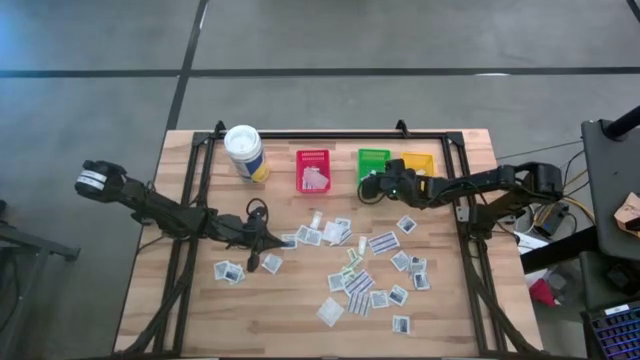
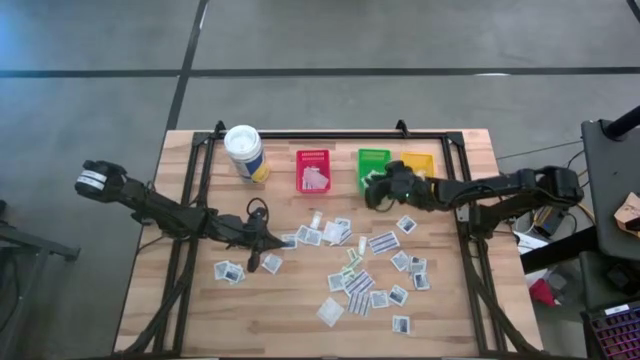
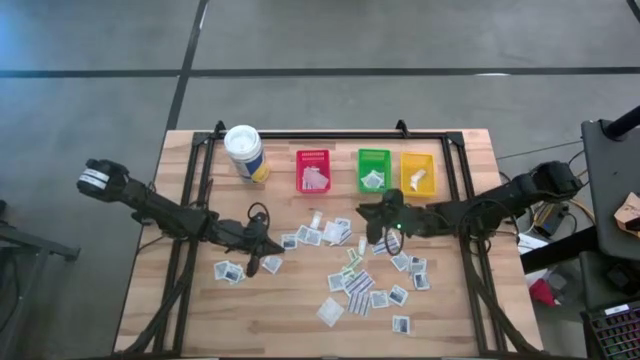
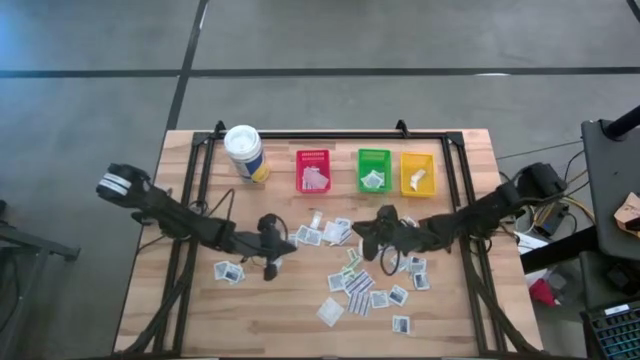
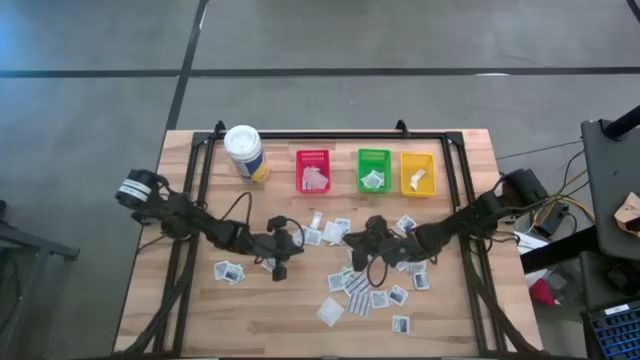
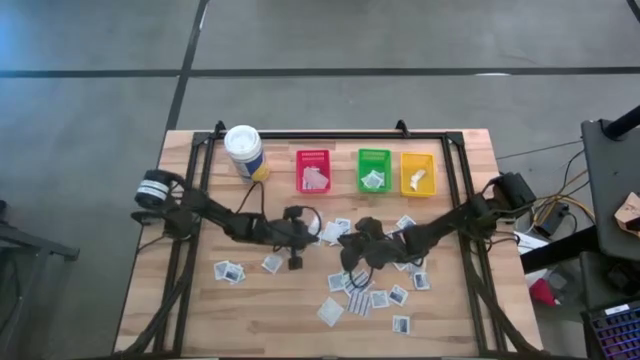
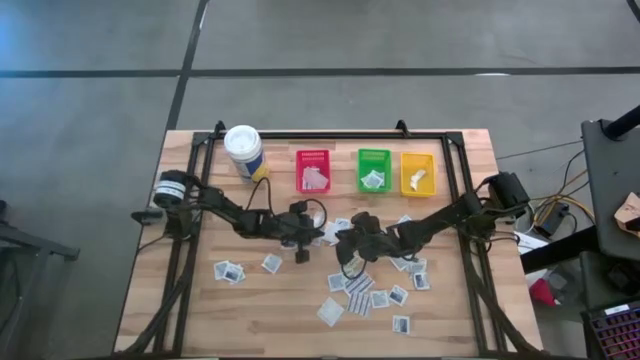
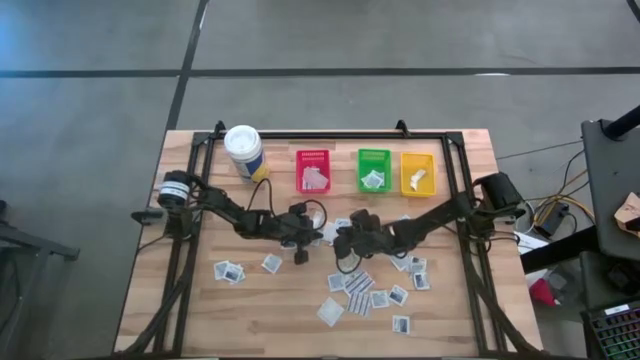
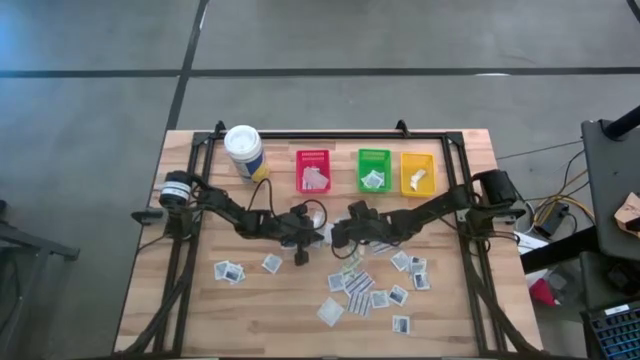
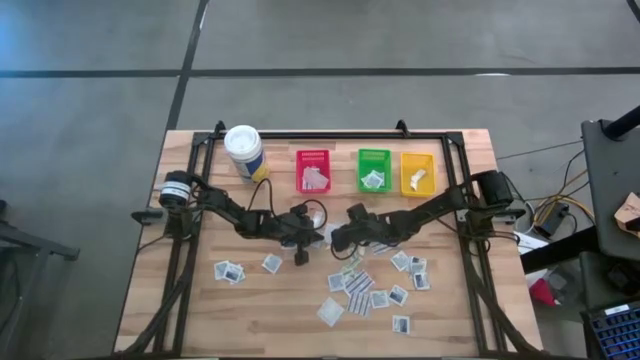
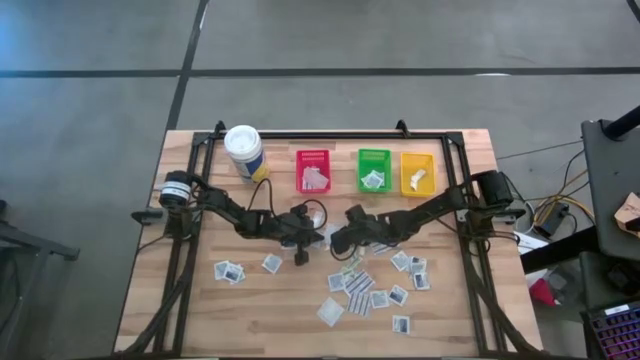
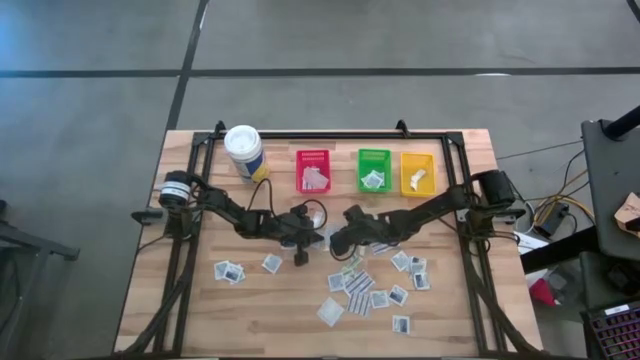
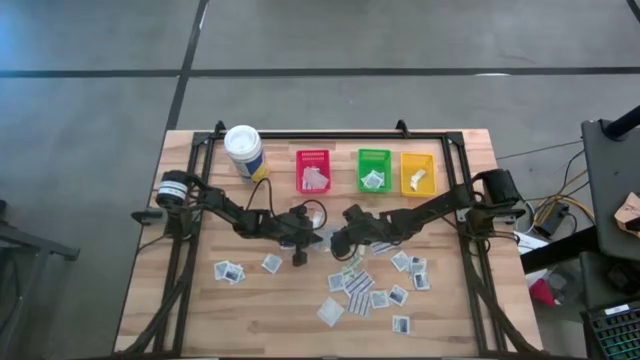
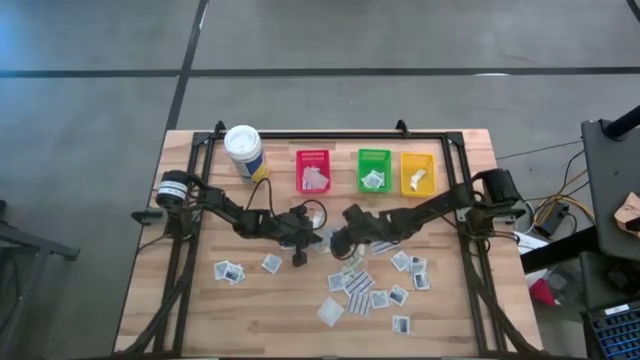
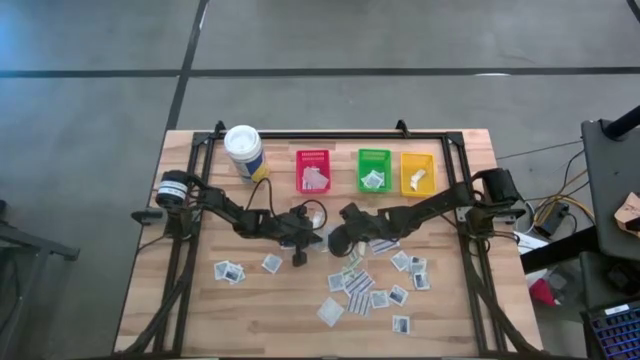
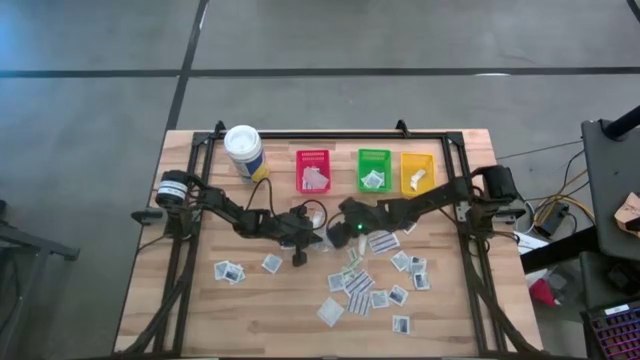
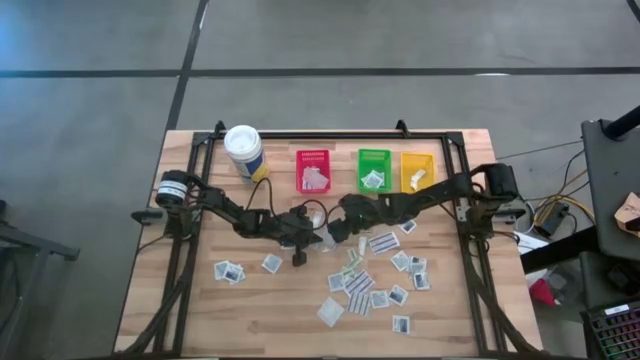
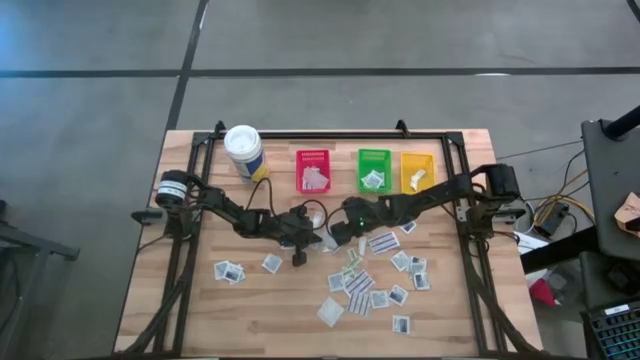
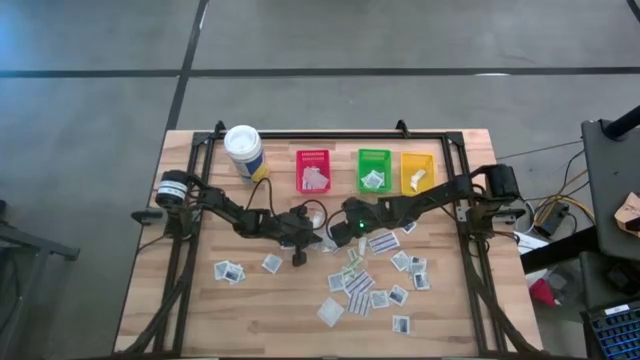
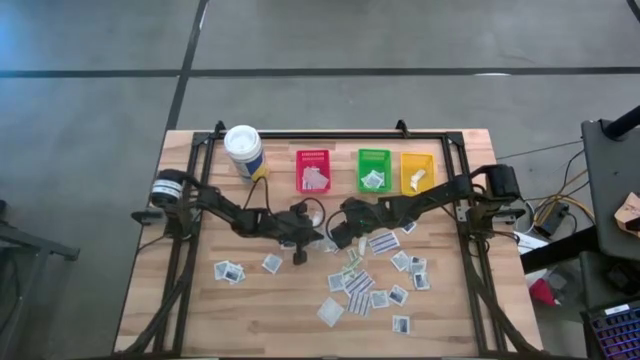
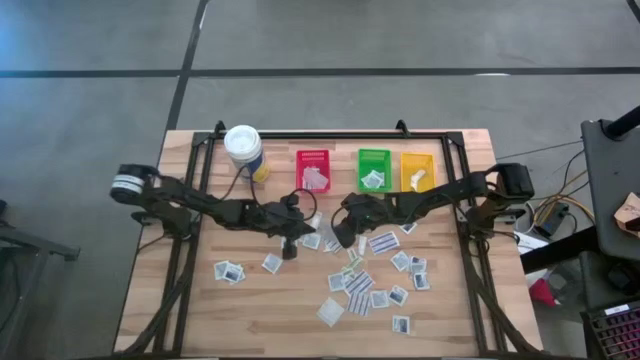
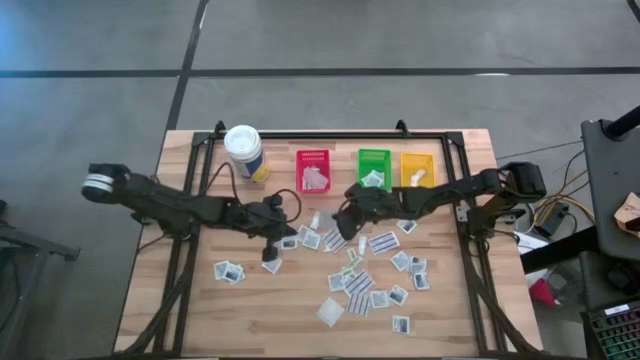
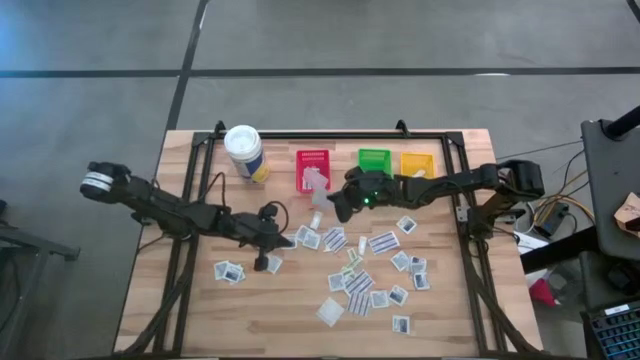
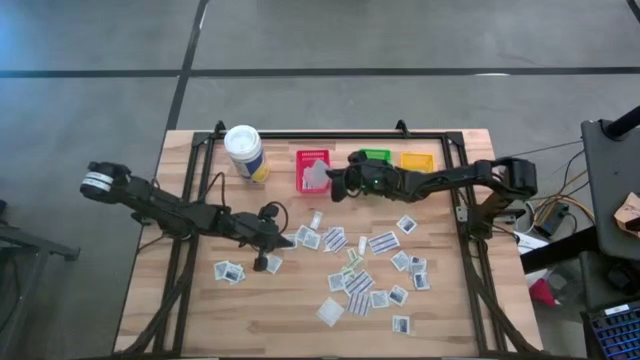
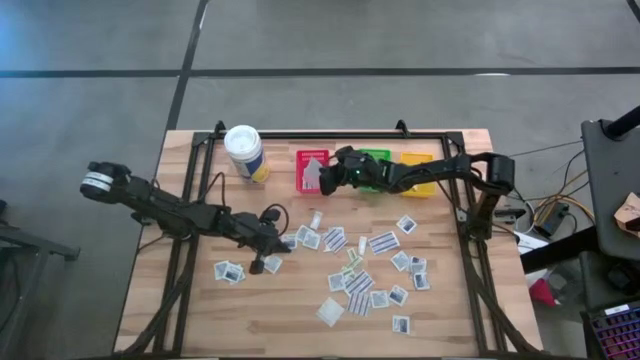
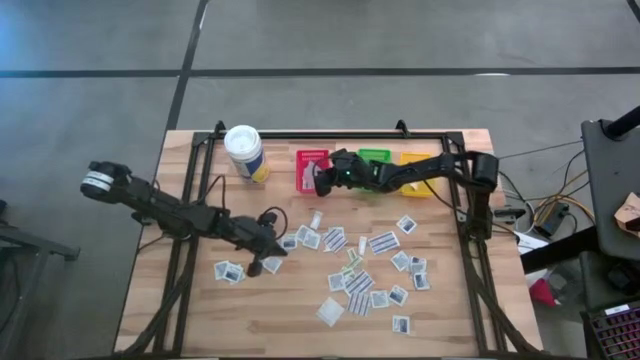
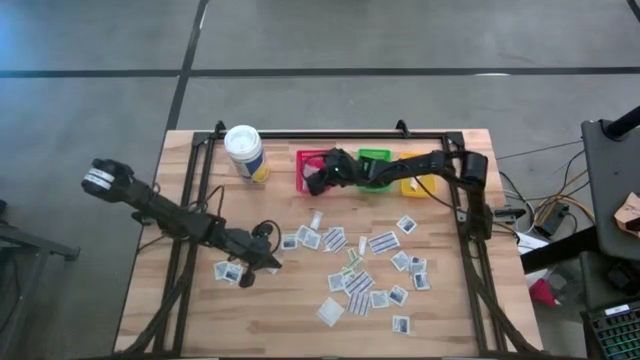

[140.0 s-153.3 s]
Task: Pick & Place First Aid Supplies
Put the blue bandage in the red bin

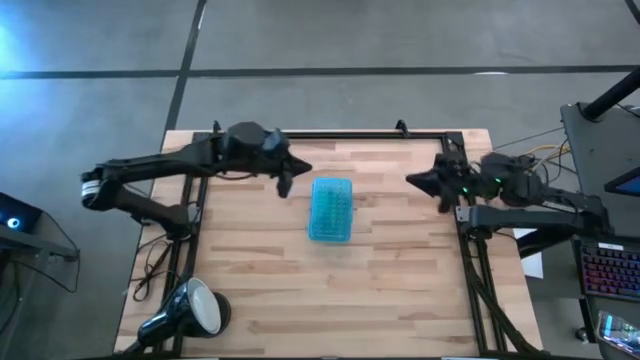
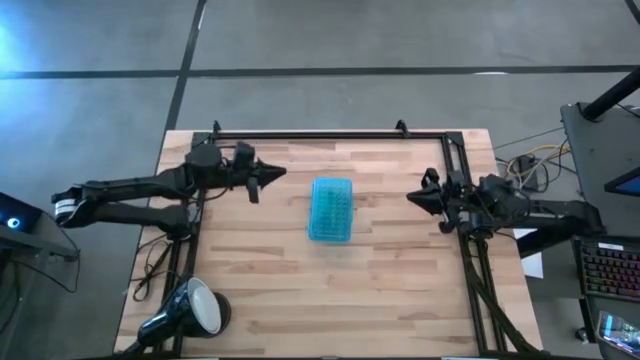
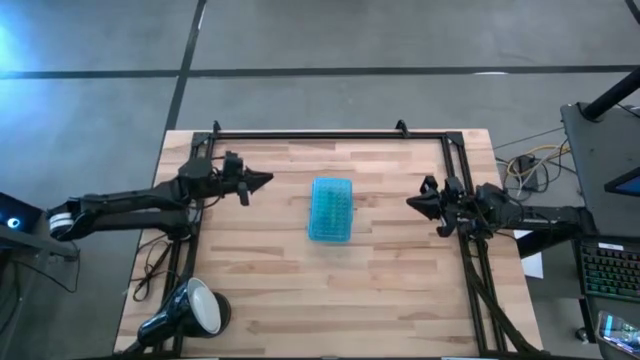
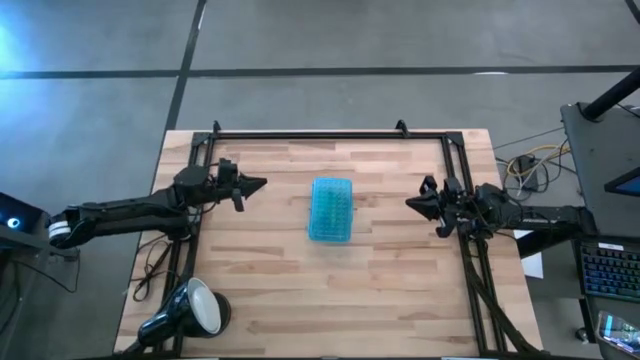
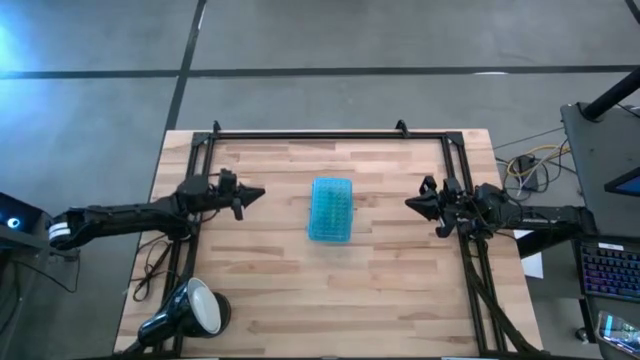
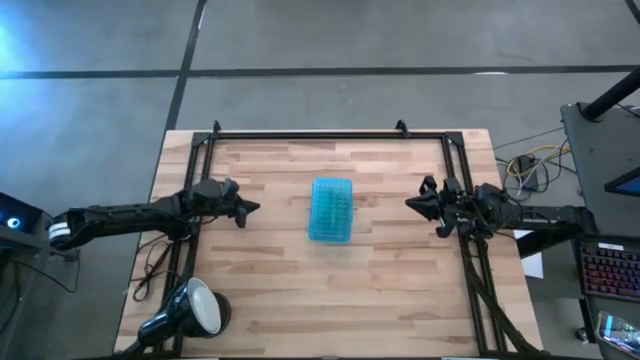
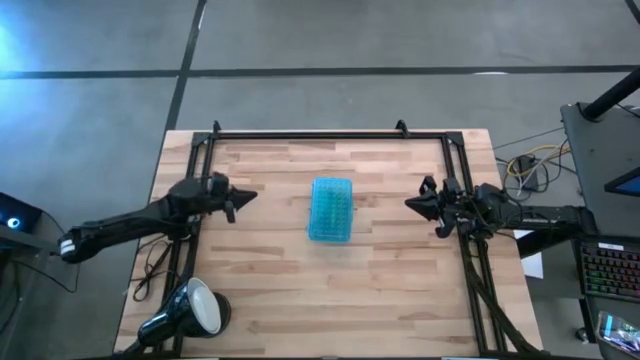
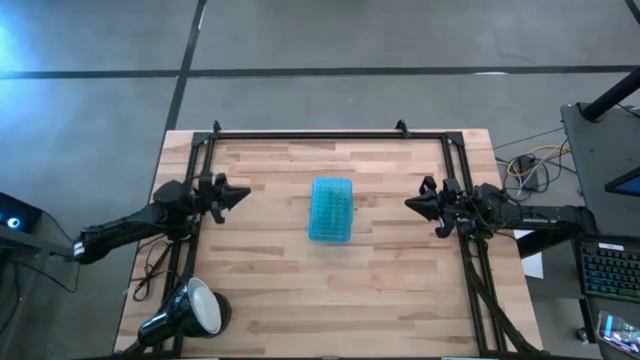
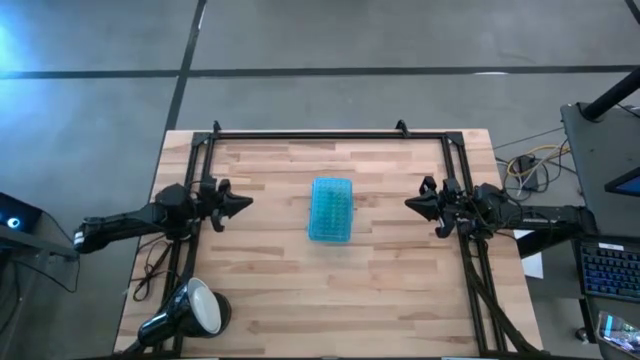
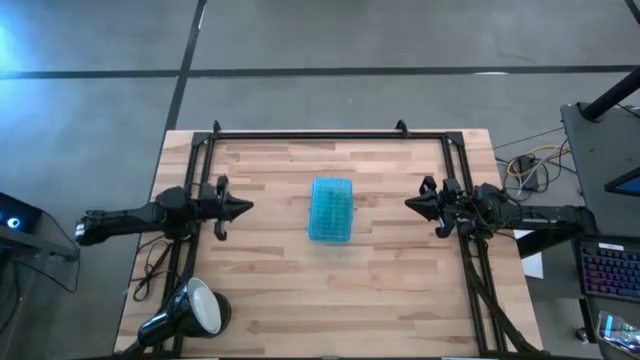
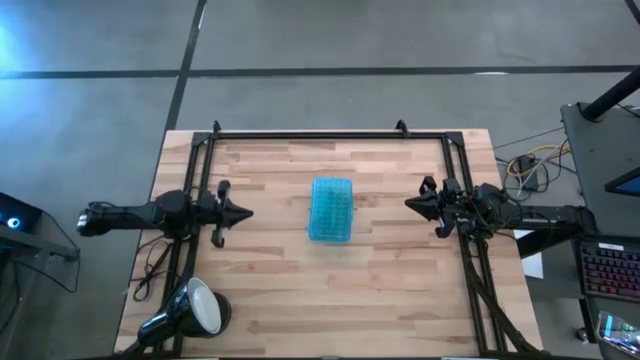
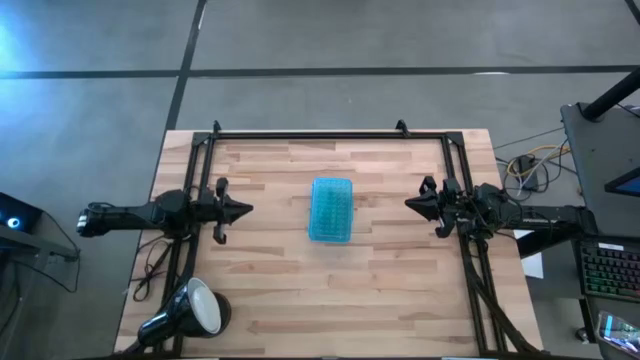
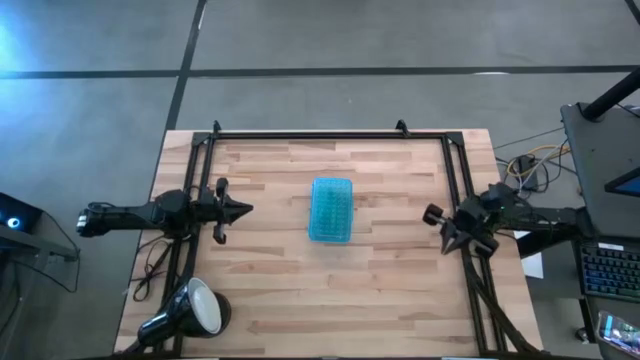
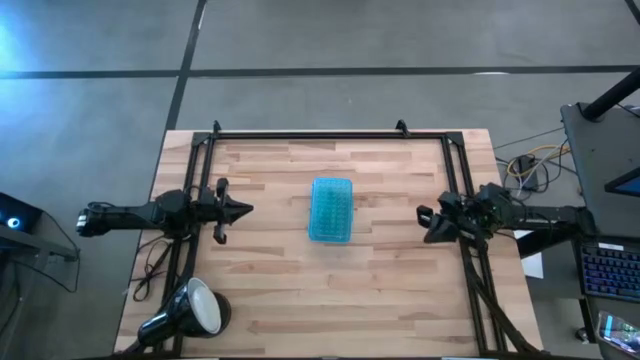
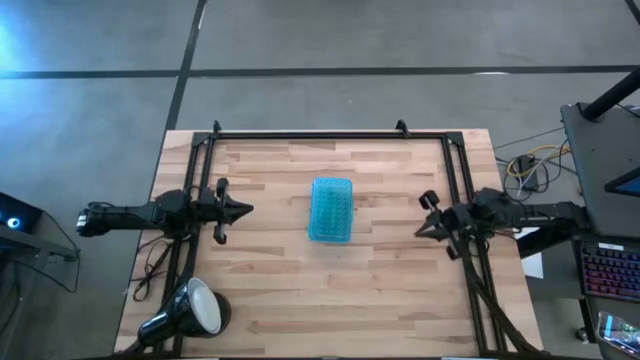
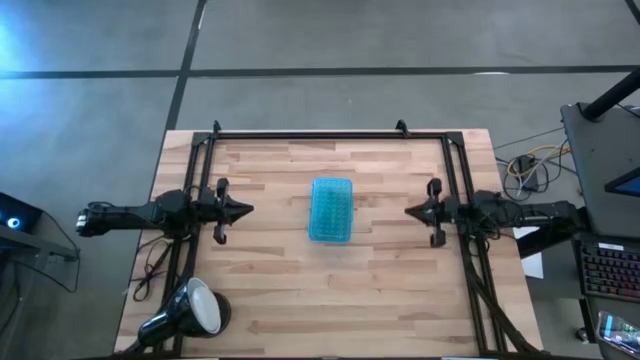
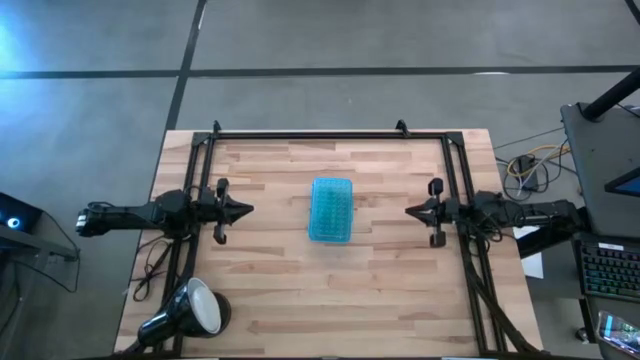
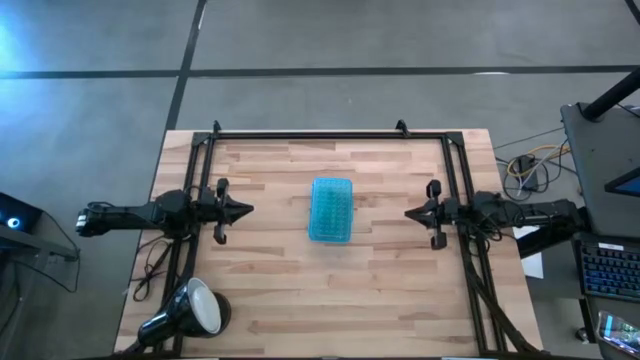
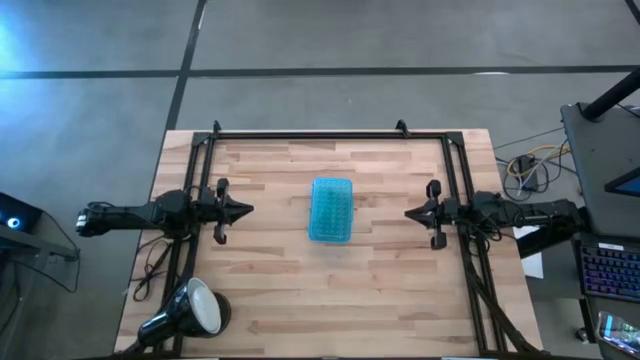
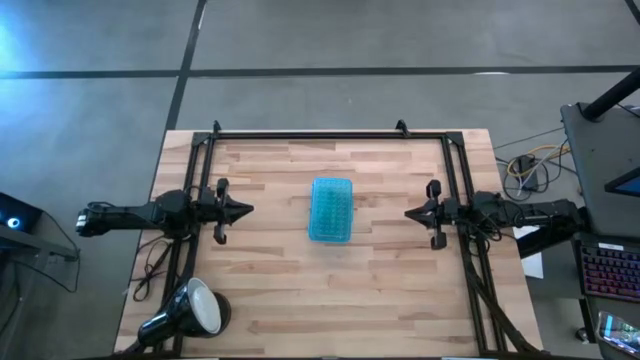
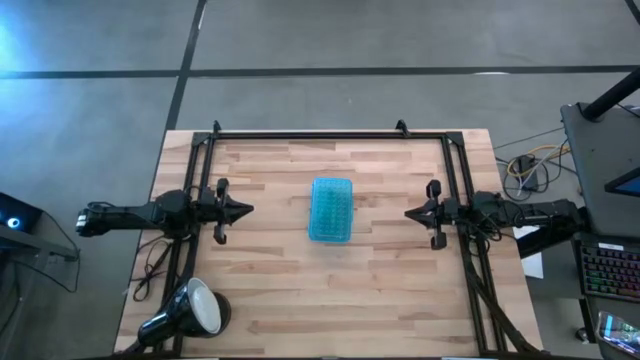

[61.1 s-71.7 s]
Task: Pick & place school supplies into a supply box
Return to Home Position
